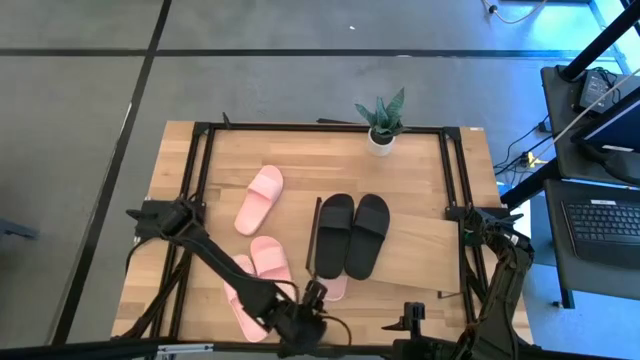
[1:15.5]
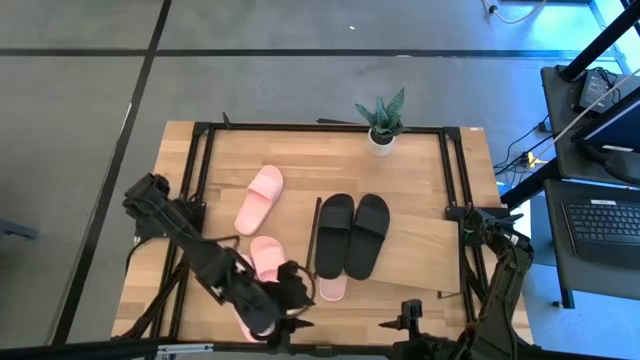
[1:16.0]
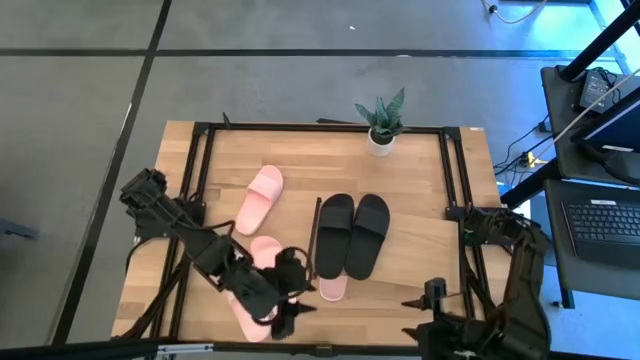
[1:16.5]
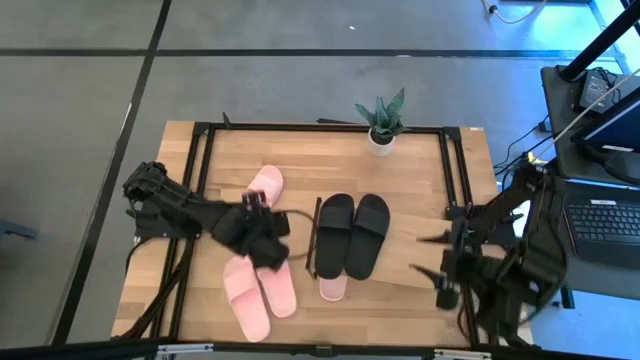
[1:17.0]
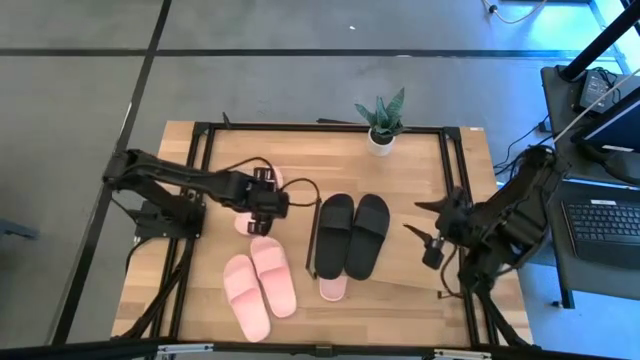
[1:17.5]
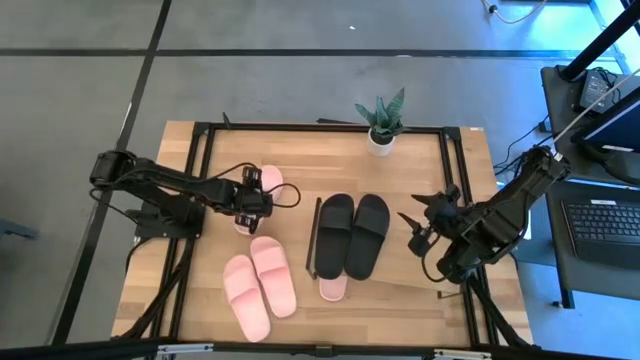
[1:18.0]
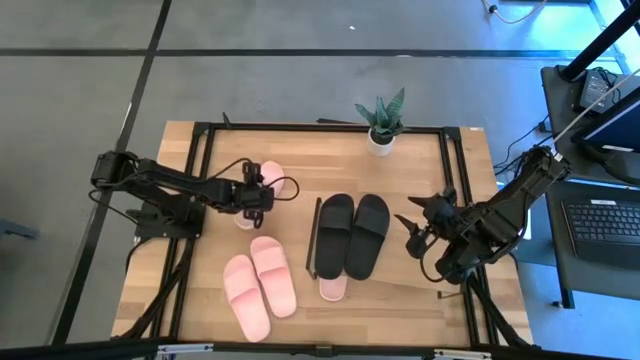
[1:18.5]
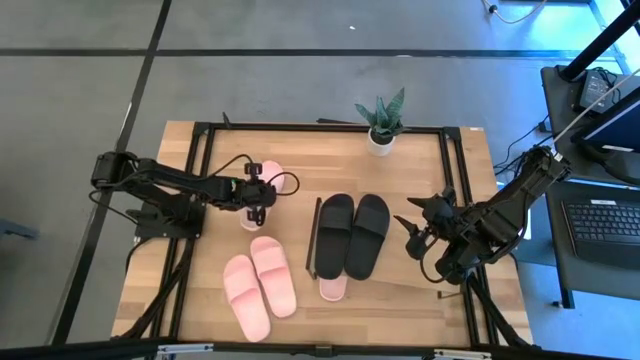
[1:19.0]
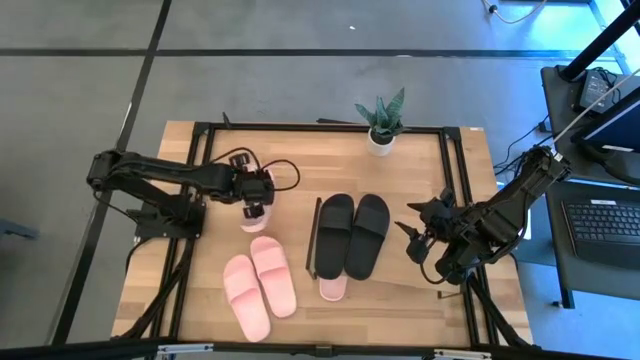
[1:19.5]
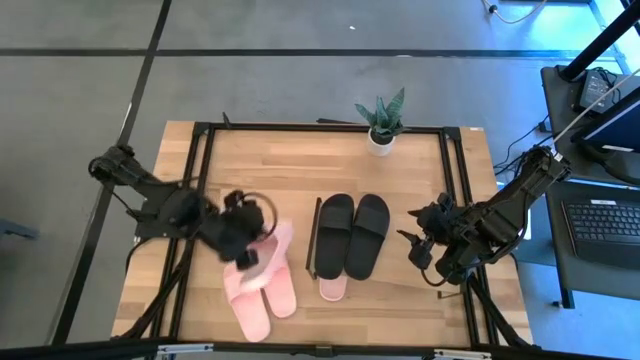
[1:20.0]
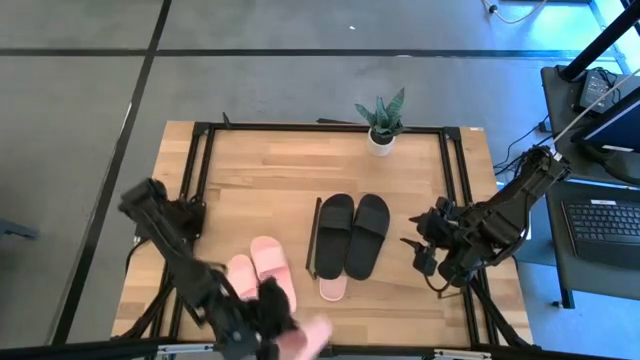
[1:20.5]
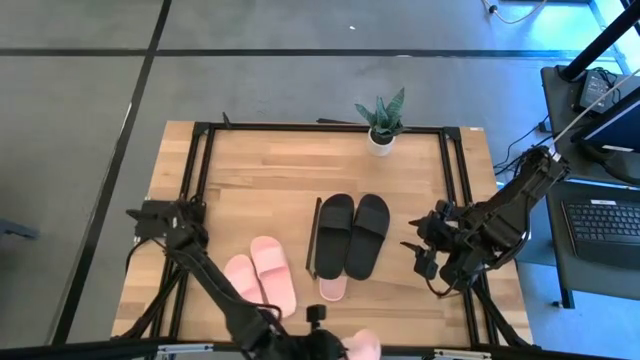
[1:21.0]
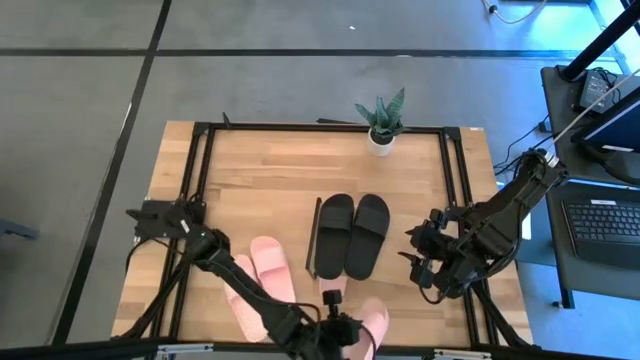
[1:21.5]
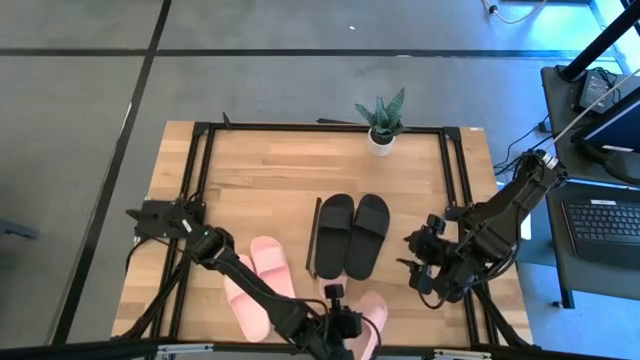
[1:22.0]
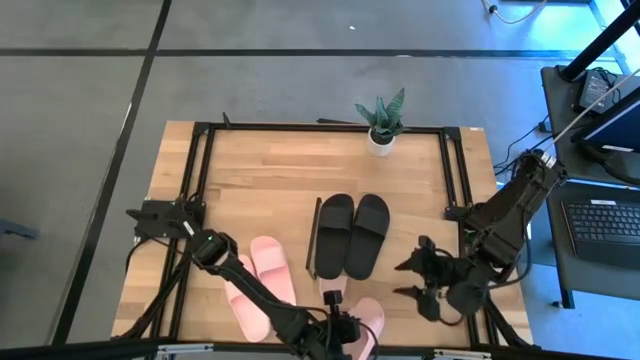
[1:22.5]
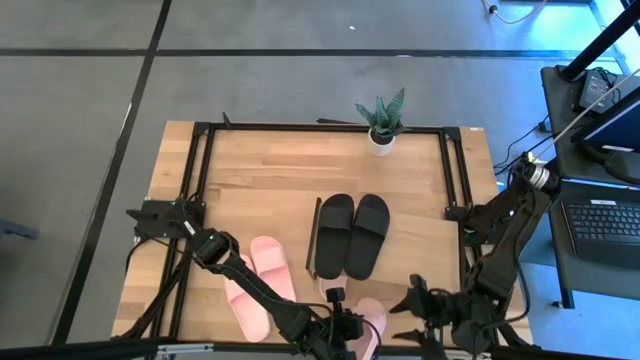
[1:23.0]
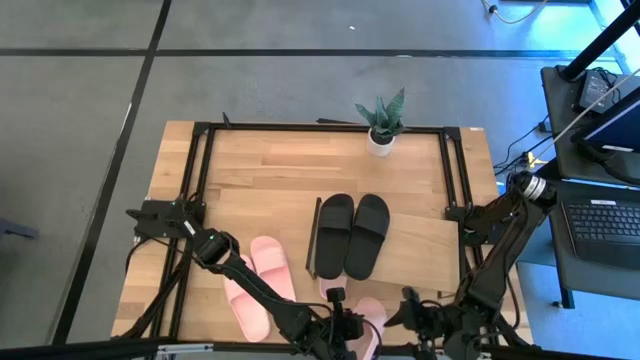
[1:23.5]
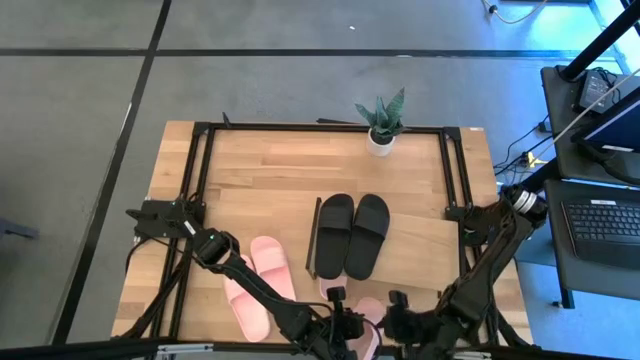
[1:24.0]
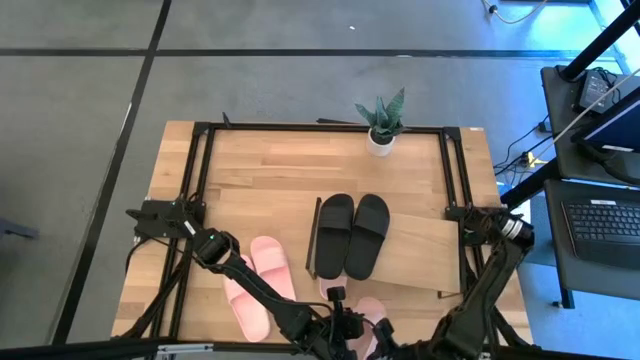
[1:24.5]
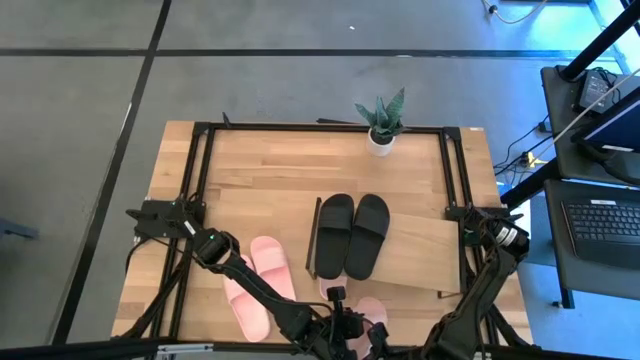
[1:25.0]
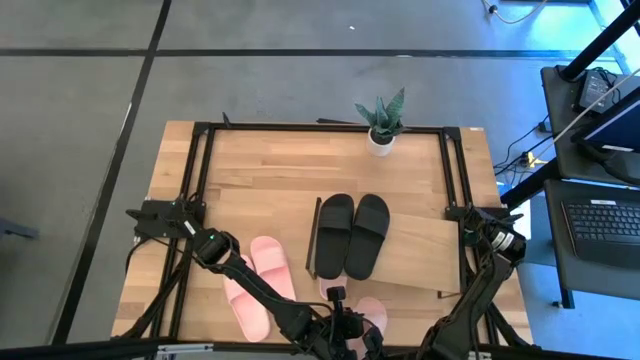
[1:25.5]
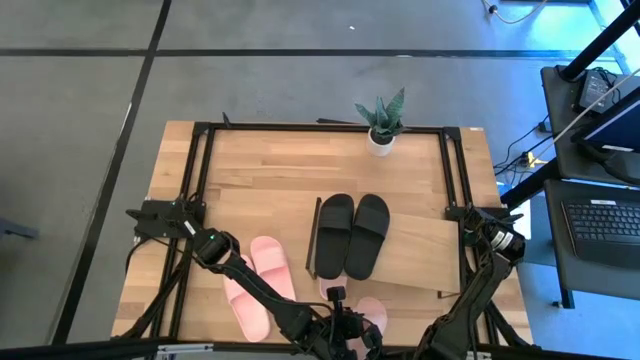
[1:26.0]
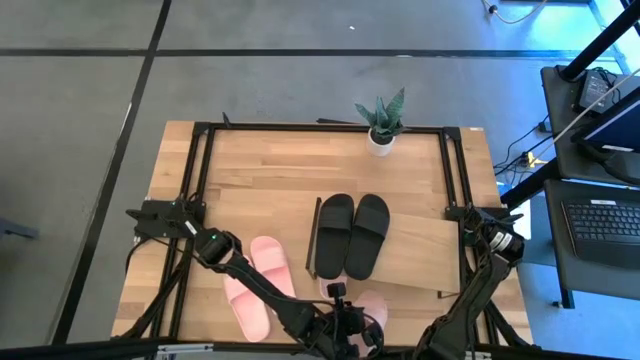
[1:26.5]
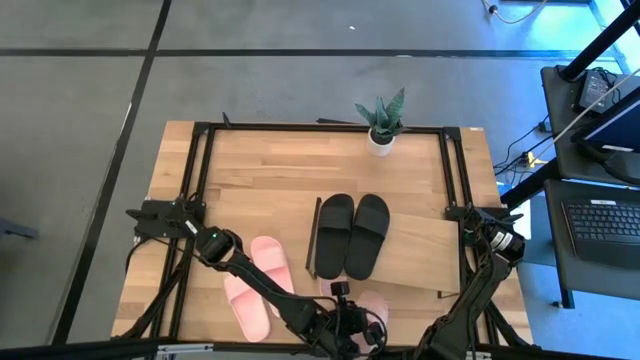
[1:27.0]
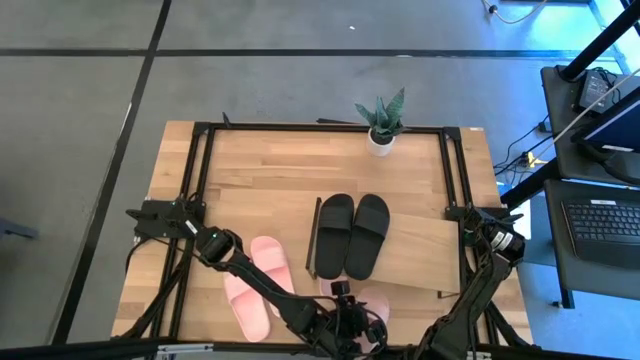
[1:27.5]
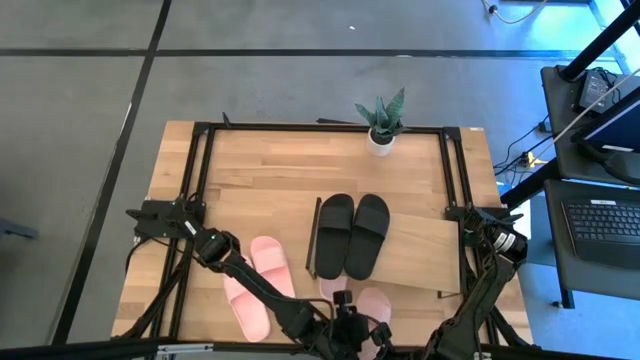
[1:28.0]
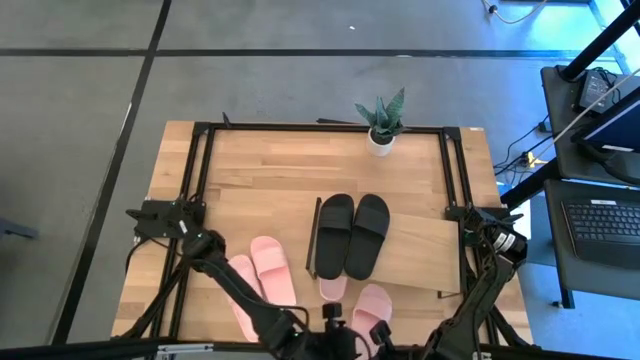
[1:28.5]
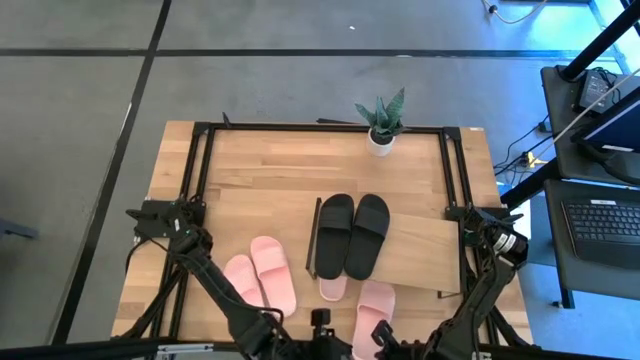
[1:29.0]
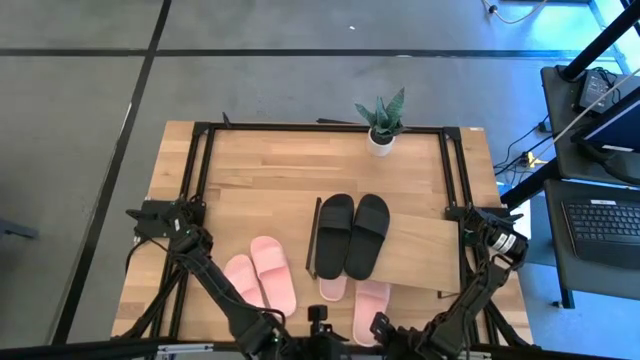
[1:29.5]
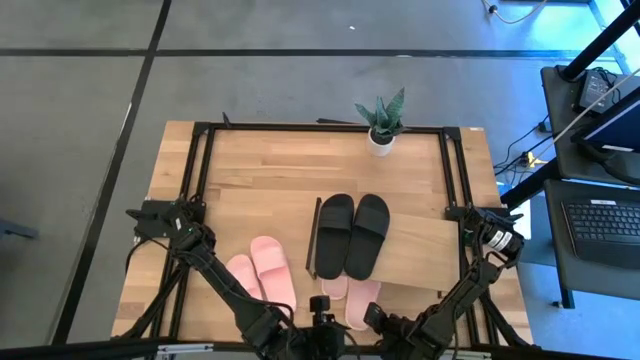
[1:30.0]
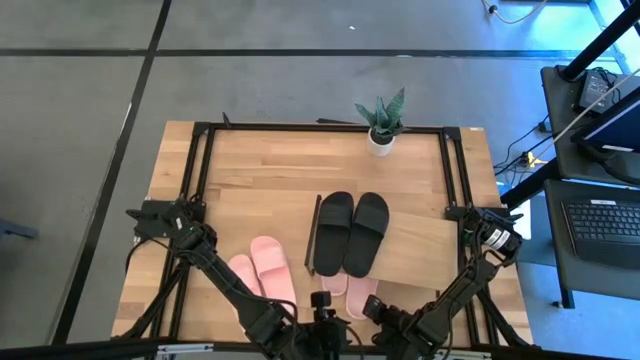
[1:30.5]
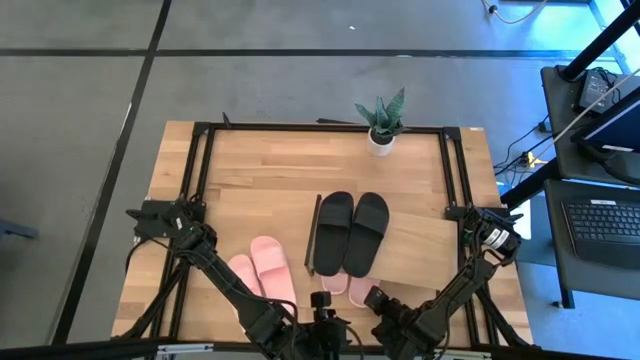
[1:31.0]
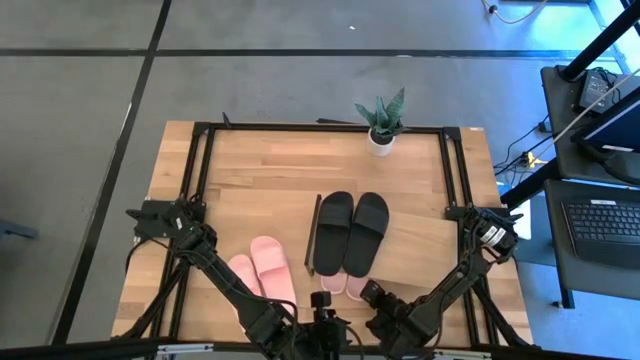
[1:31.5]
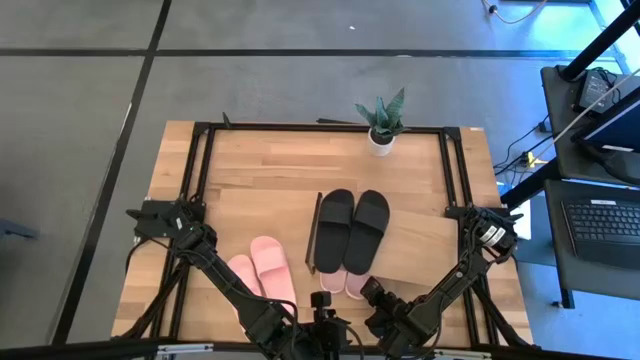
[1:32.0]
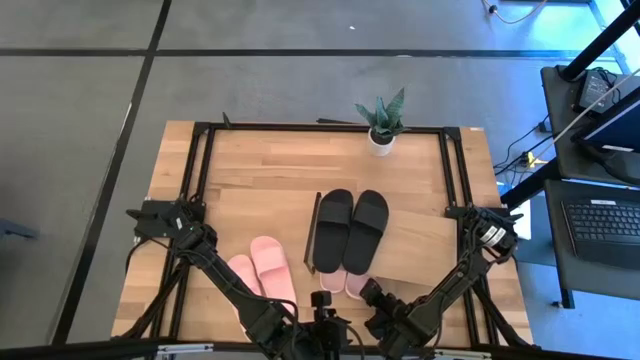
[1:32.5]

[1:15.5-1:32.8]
Task: Pick and place slides into the shelf
Put the top pink slipper under the shelf

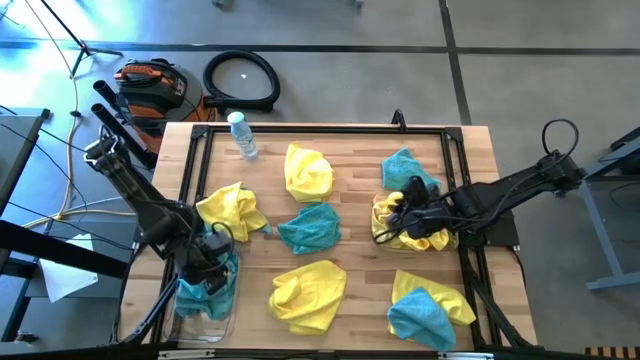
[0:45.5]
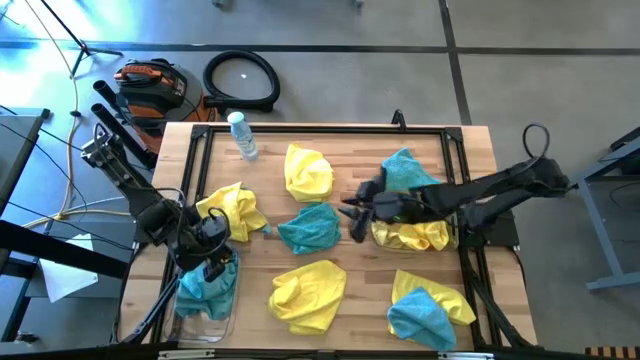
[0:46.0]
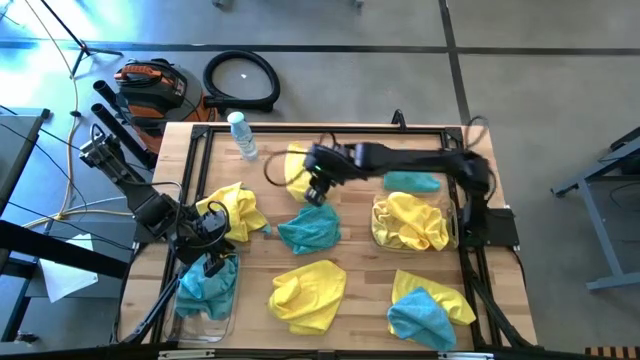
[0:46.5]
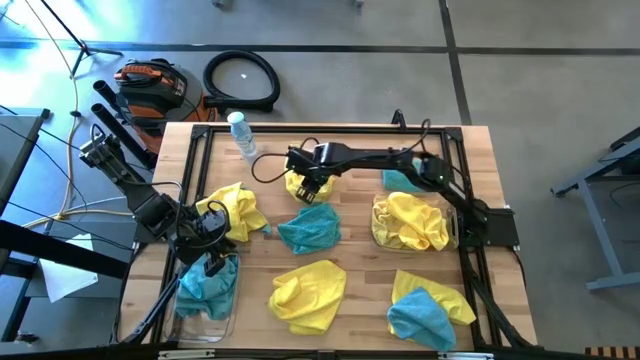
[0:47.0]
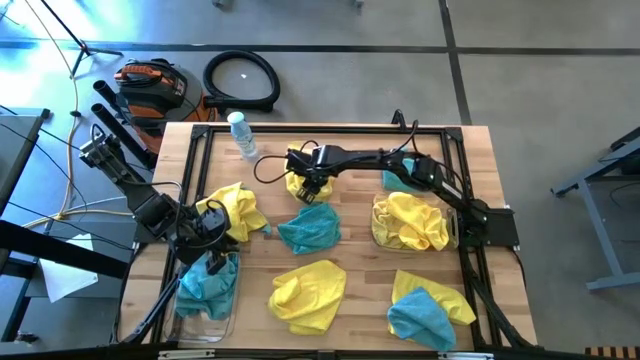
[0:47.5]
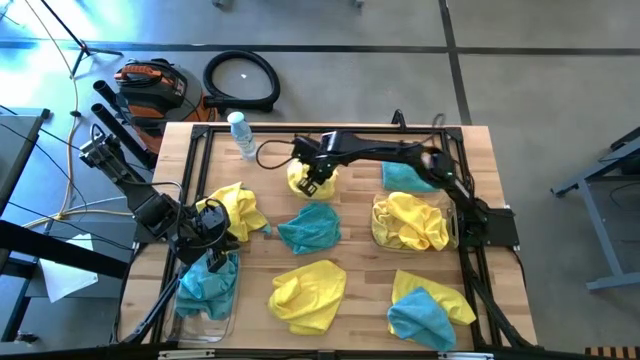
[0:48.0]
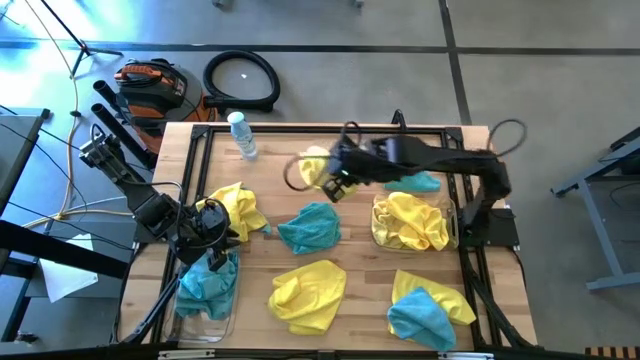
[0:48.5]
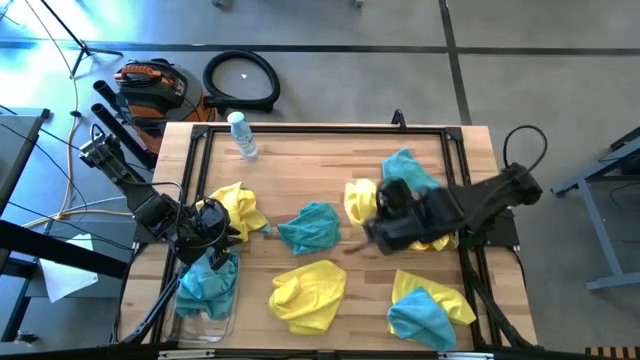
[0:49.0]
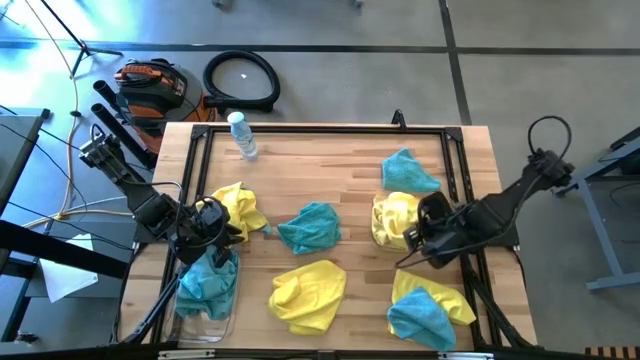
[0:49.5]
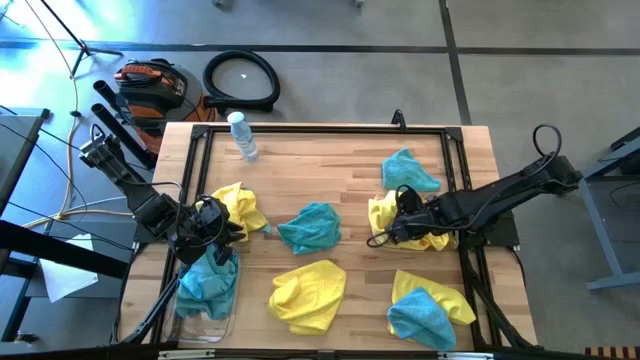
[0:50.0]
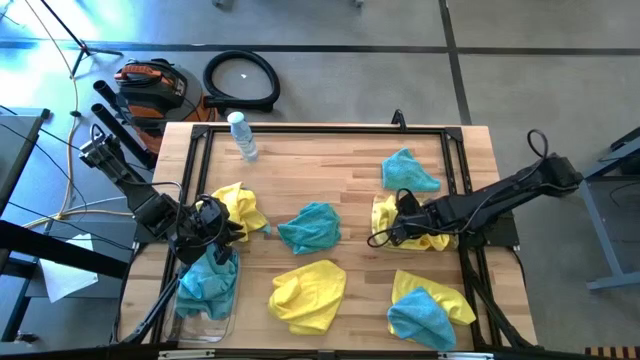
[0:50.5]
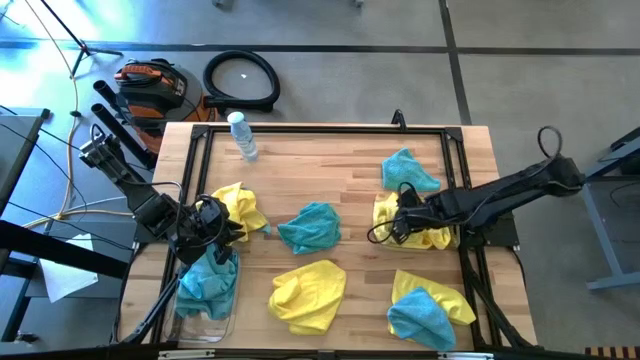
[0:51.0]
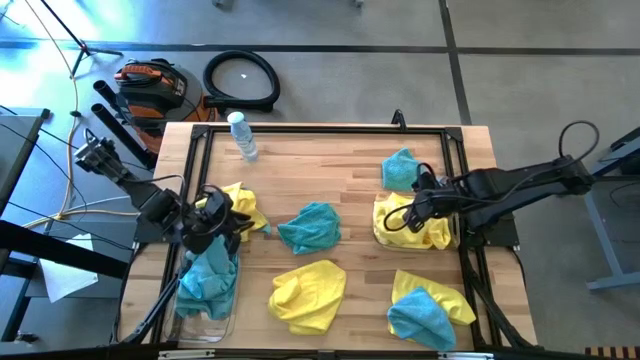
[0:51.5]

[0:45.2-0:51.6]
Task: Sort microfiber towel by color & place in baskets
Put the yellow microfiber towel into the right transparent bin
